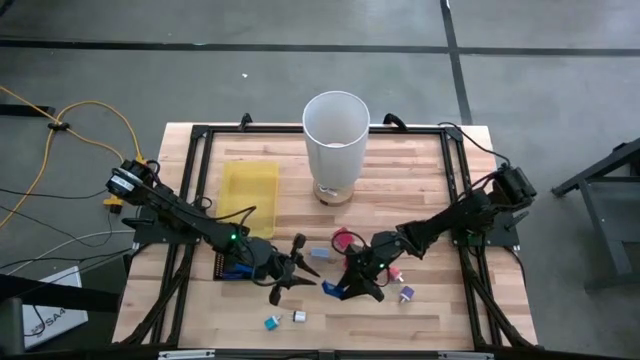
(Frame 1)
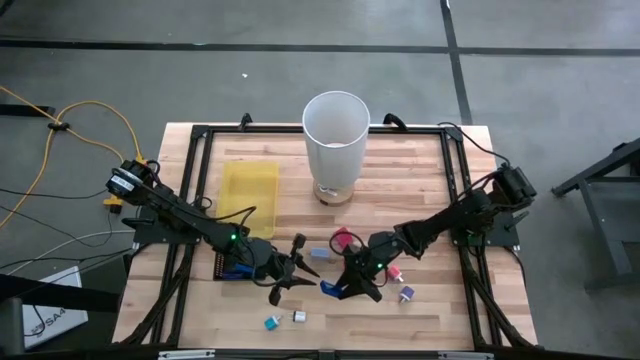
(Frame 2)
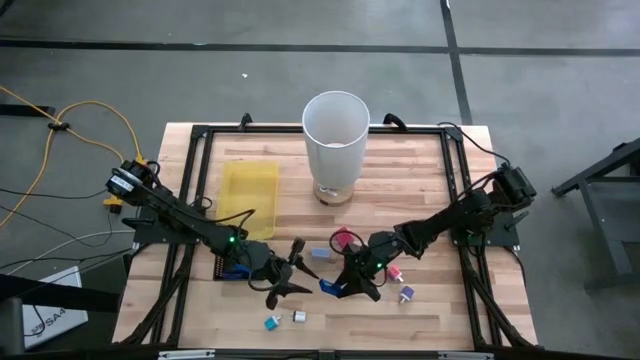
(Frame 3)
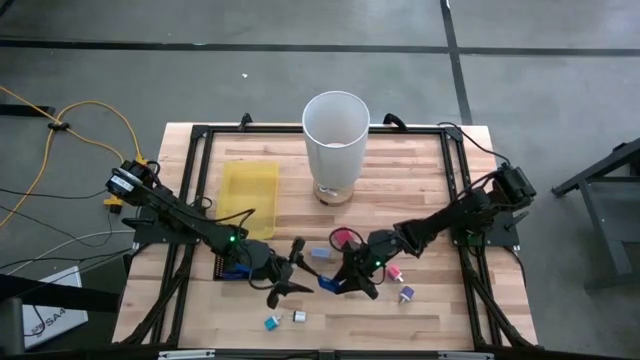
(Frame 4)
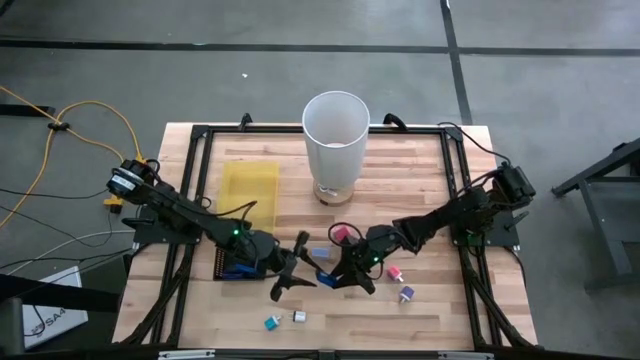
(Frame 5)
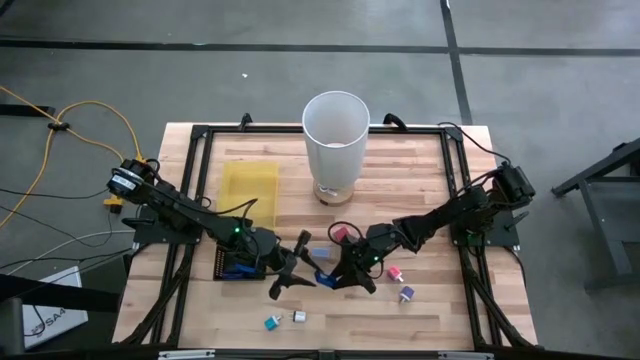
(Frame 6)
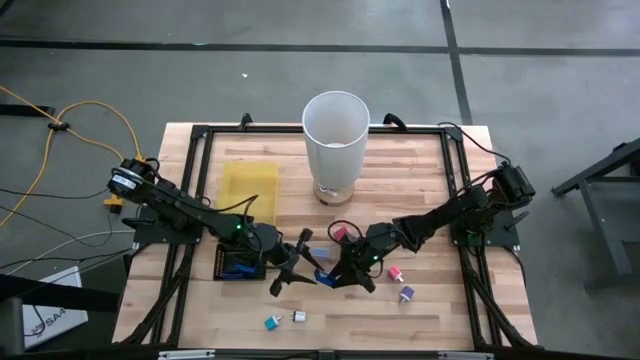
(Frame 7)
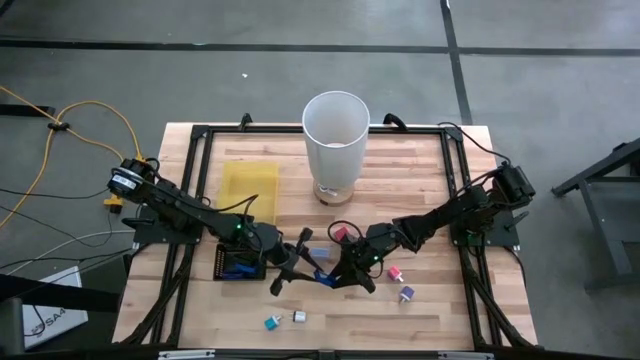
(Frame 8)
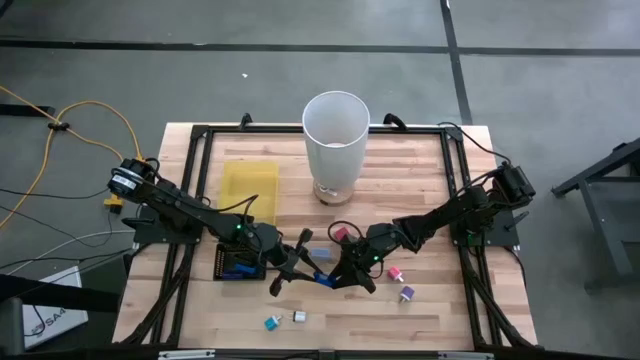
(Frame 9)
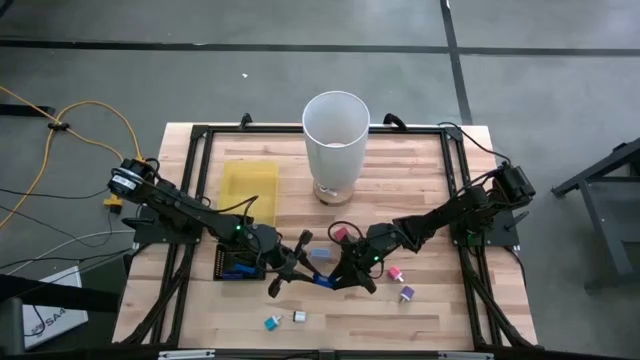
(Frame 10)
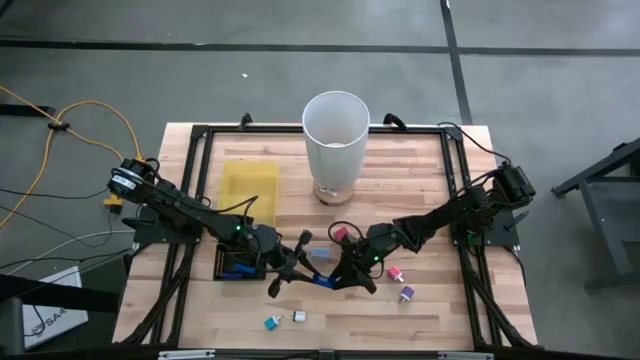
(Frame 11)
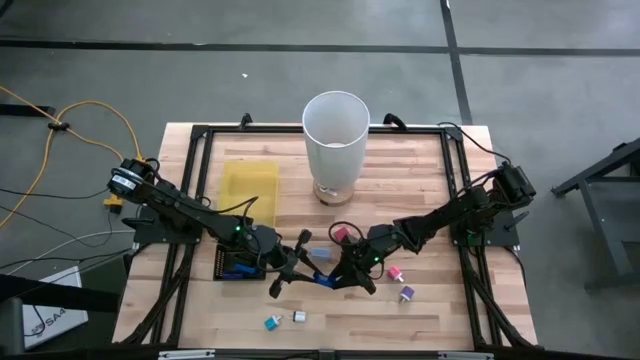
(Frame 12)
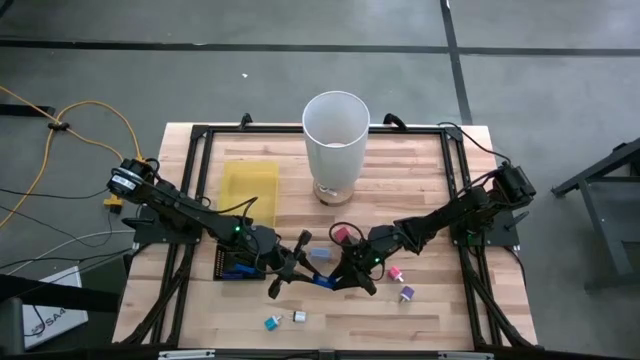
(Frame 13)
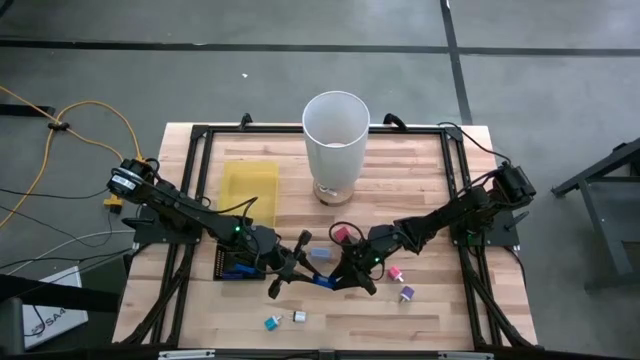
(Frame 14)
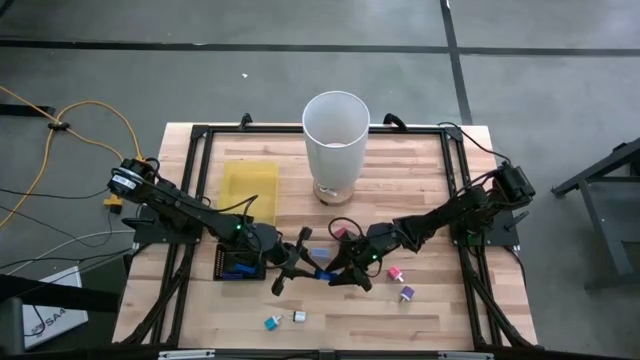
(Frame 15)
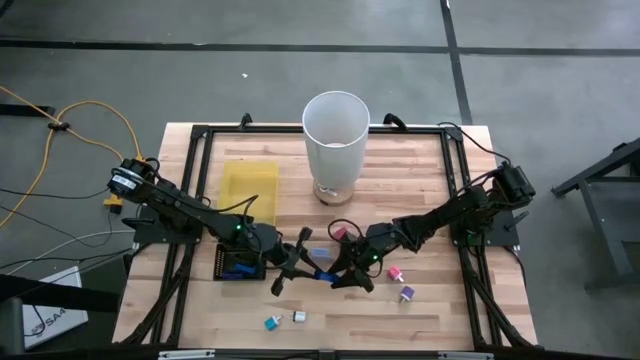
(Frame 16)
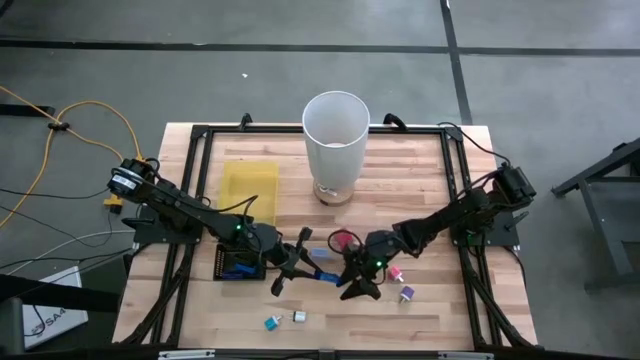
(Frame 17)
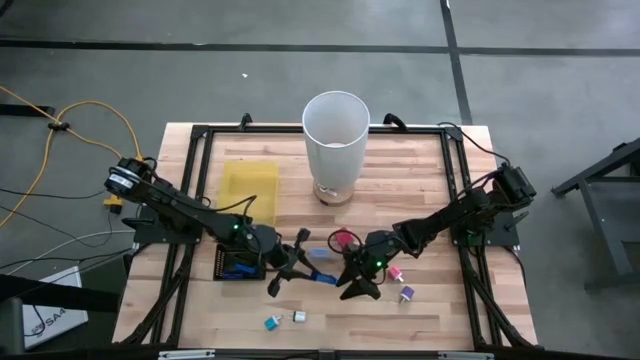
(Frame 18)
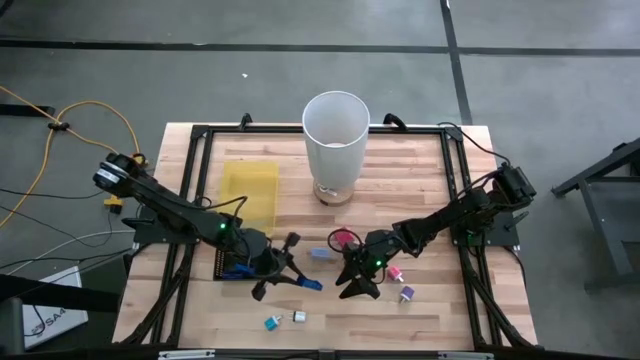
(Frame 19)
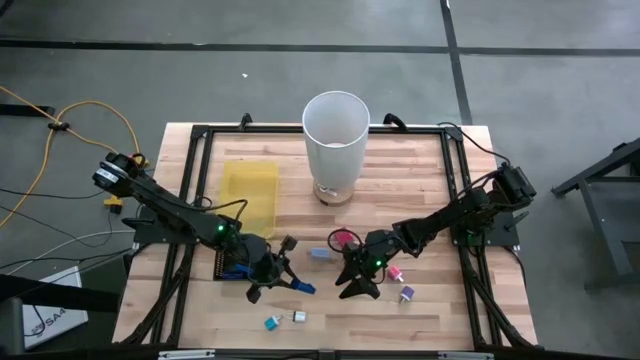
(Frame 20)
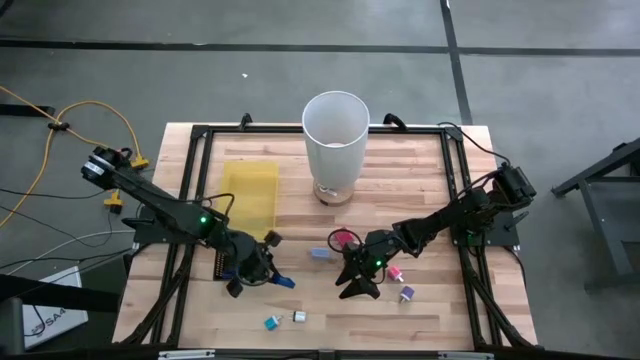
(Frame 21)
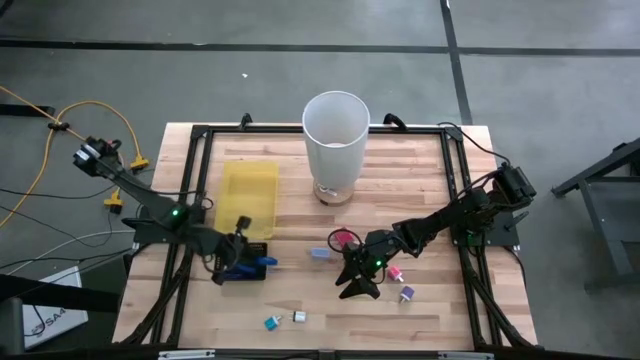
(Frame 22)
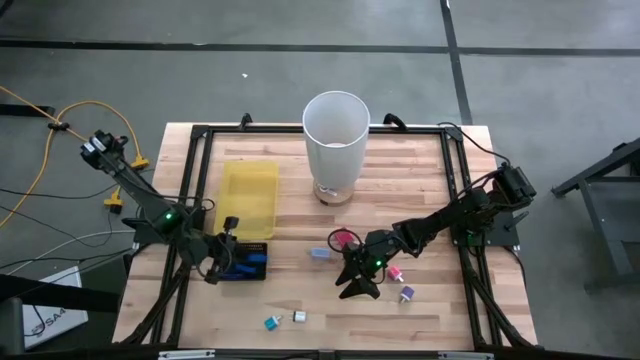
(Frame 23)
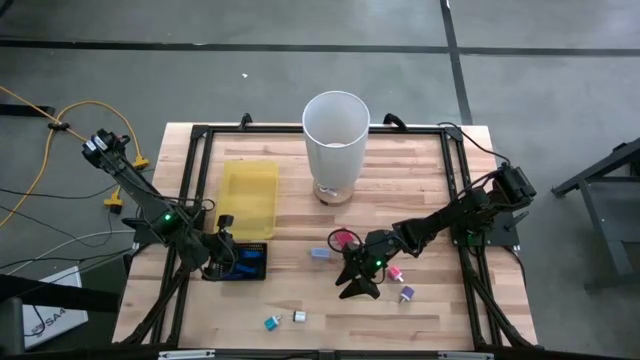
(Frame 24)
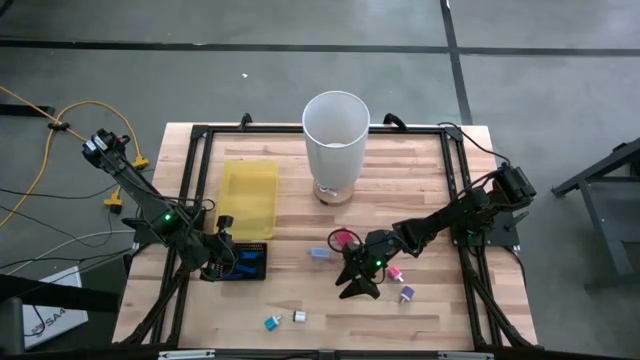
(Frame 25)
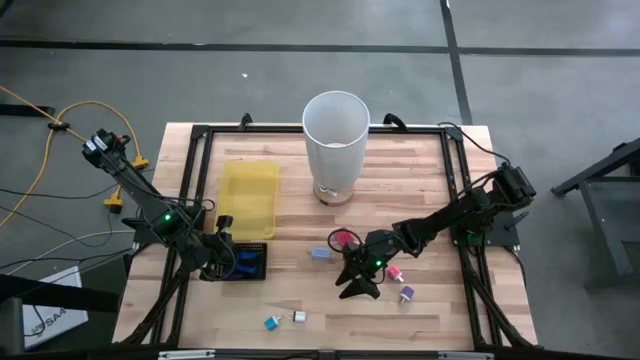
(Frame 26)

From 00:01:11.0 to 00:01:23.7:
Task: Pick & Place Office items
Put the blue digital clock into the black bin

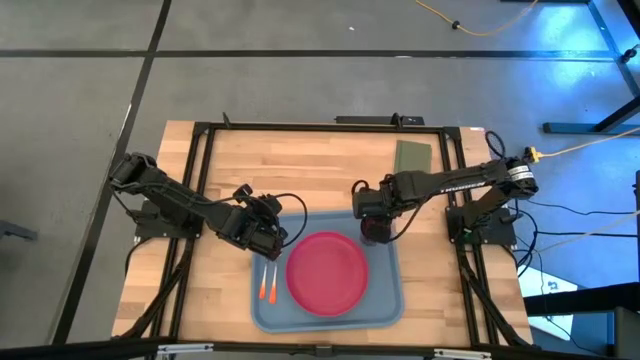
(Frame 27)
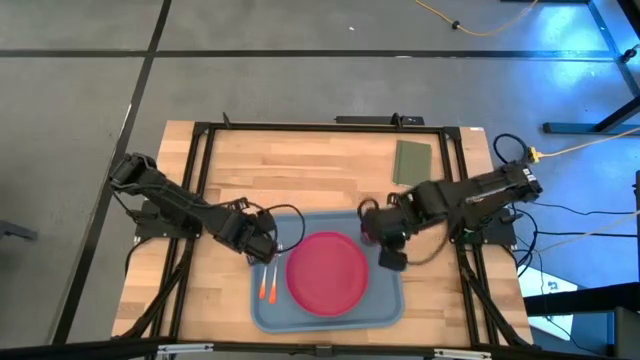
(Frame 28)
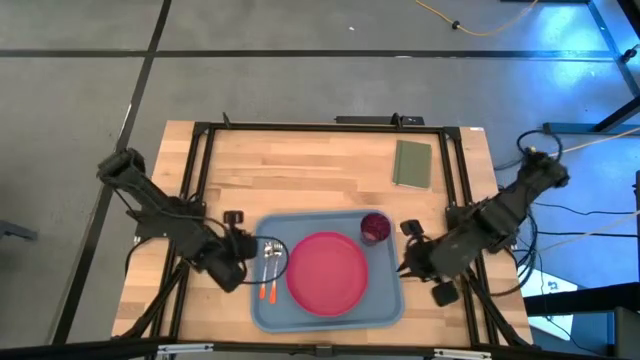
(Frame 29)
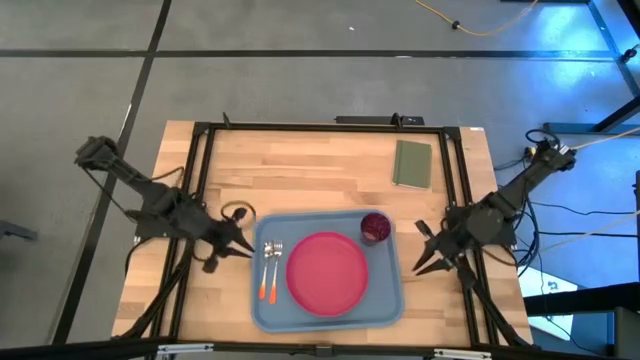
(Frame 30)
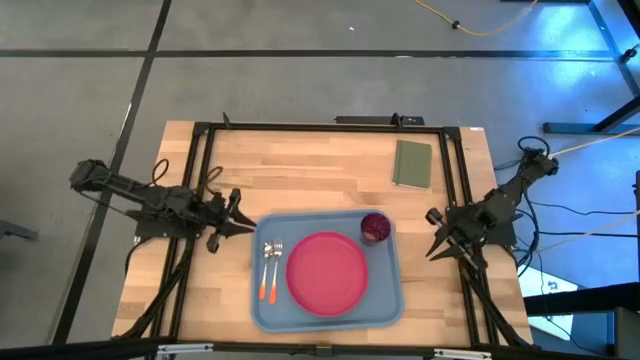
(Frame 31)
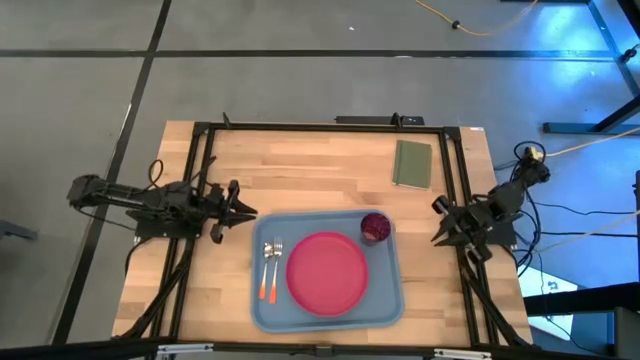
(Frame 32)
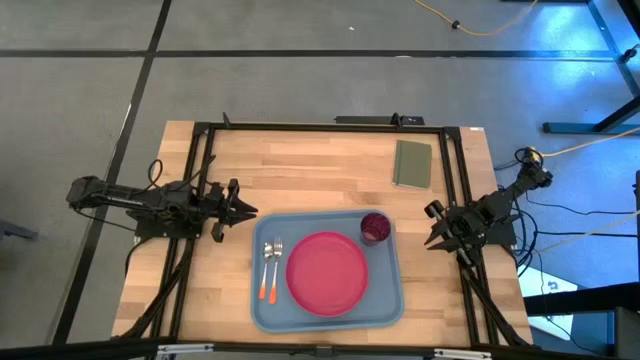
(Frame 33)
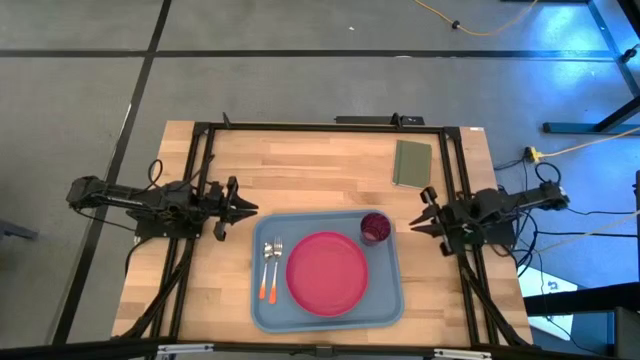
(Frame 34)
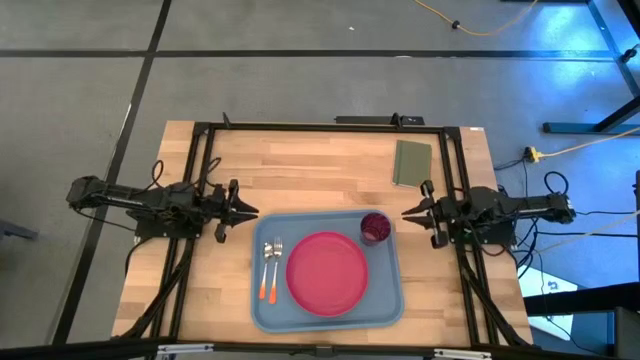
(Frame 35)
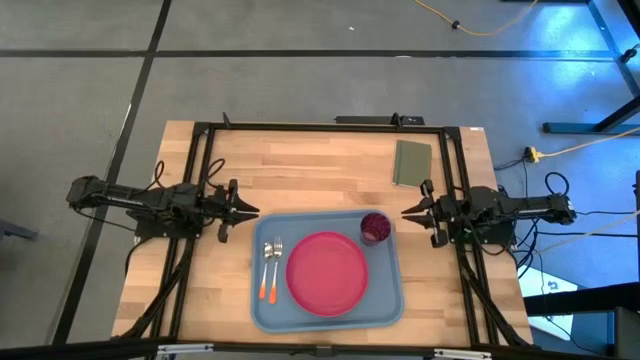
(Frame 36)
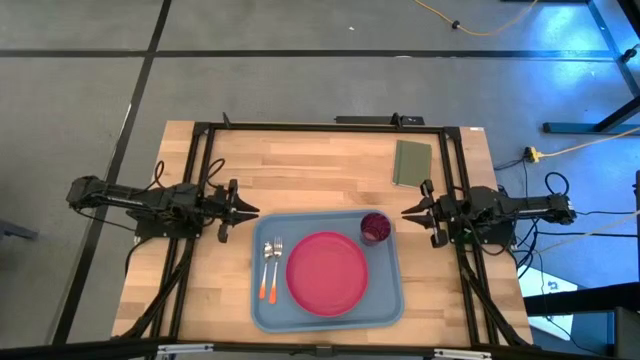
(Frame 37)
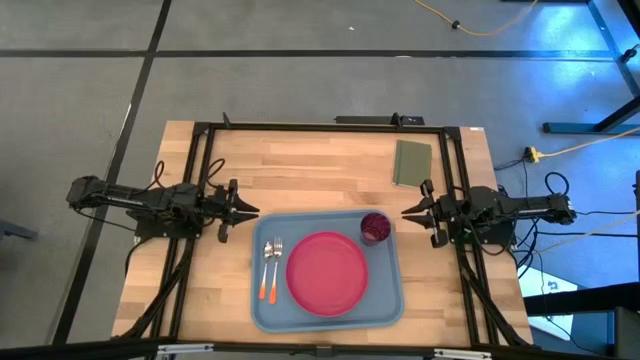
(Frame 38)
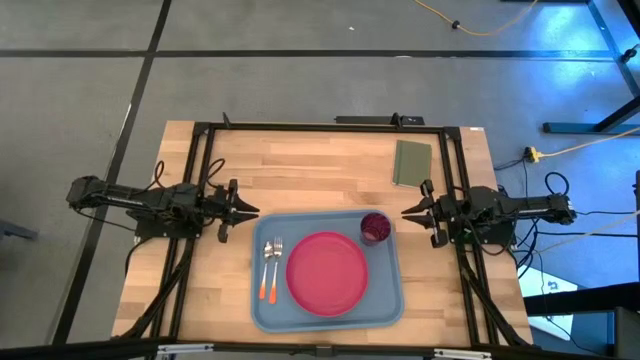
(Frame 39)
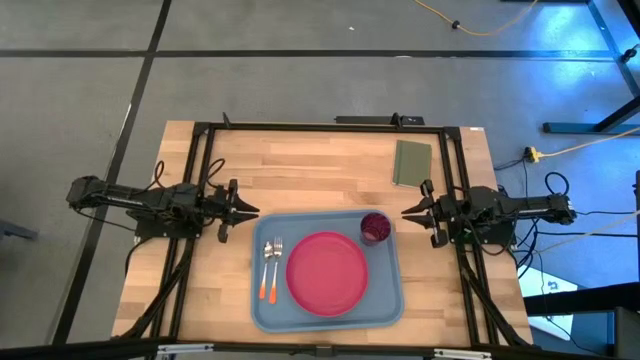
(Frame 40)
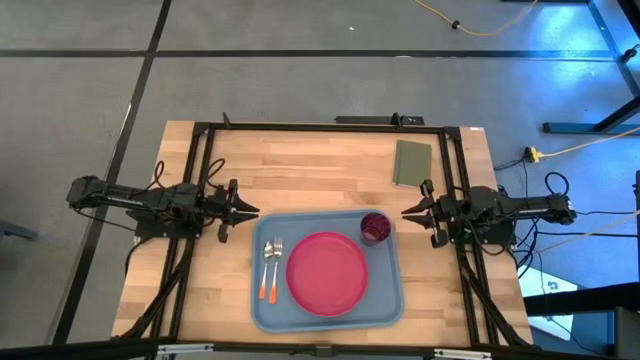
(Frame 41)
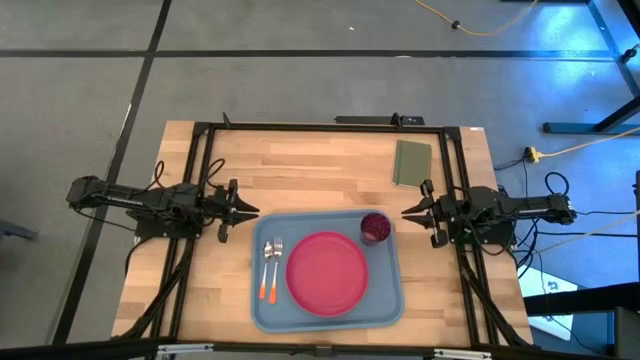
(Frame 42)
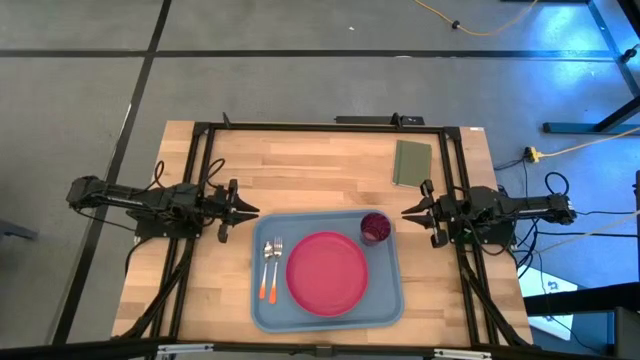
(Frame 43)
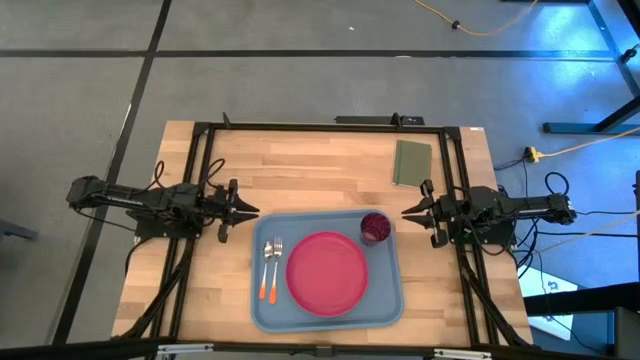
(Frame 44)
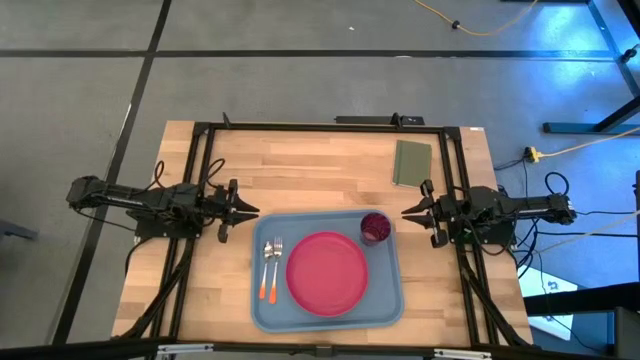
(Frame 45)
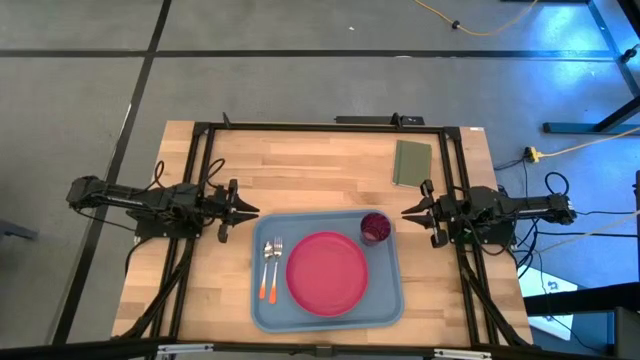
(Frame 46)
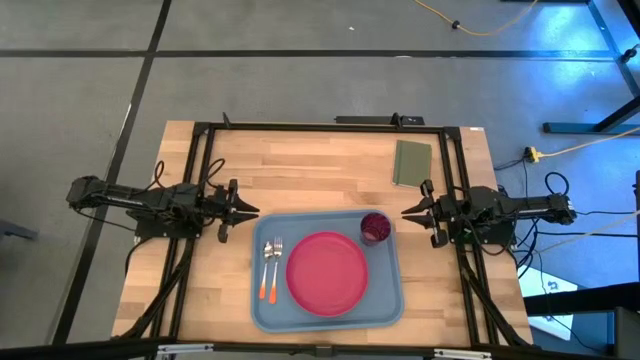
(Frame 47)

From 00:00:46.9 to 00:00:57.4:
Task: Pick and place plate/cup/fork/spoon on tray
Return to Home Position
